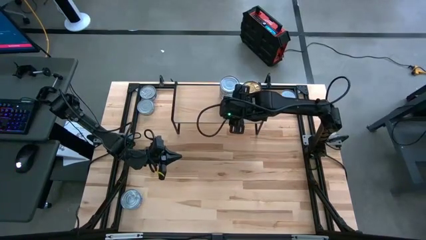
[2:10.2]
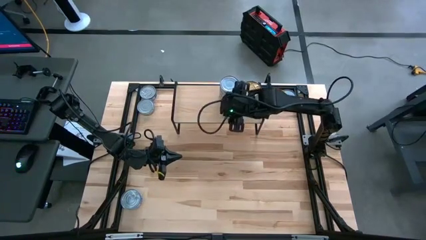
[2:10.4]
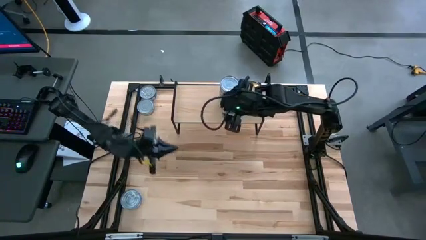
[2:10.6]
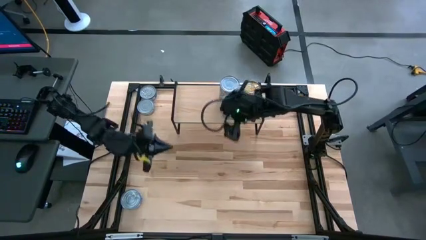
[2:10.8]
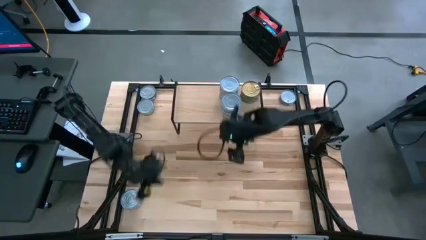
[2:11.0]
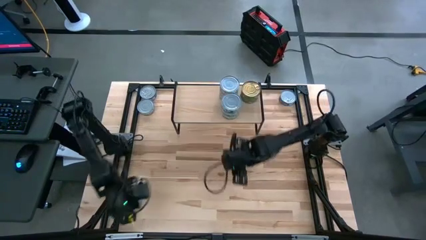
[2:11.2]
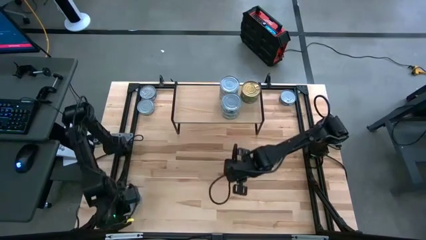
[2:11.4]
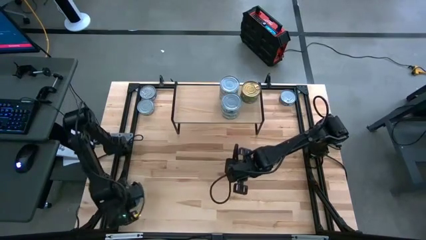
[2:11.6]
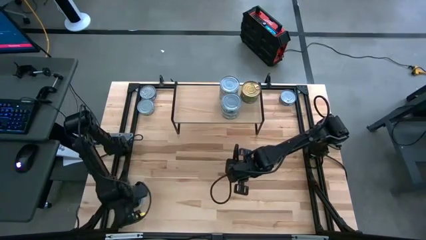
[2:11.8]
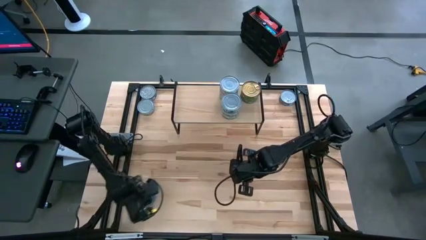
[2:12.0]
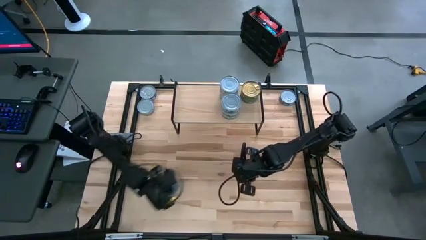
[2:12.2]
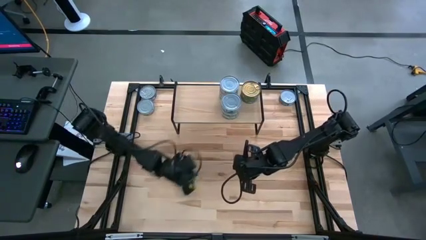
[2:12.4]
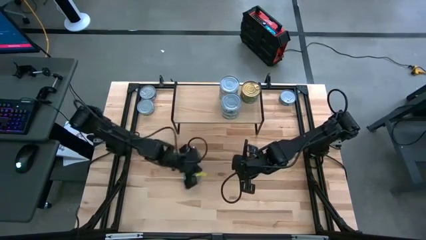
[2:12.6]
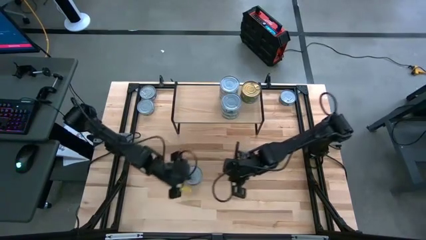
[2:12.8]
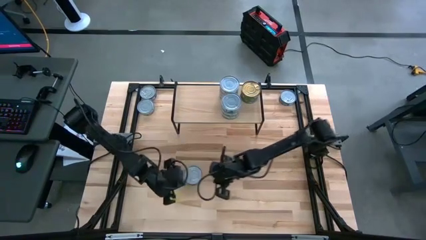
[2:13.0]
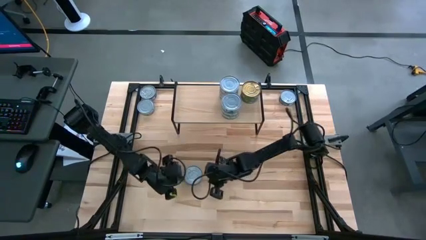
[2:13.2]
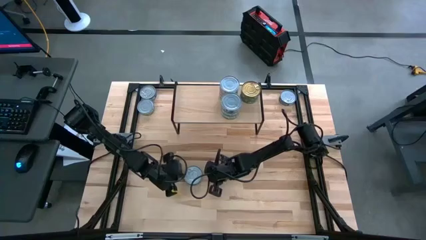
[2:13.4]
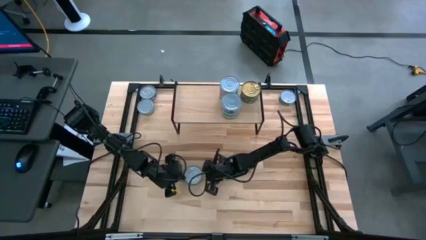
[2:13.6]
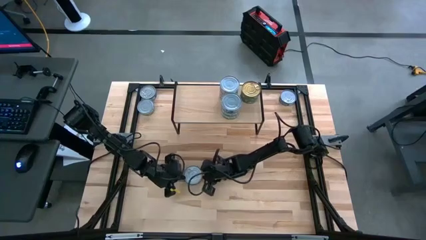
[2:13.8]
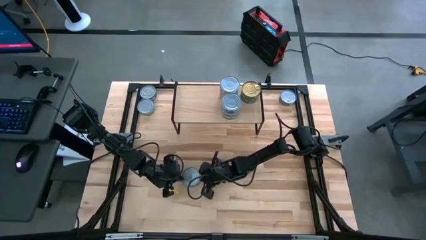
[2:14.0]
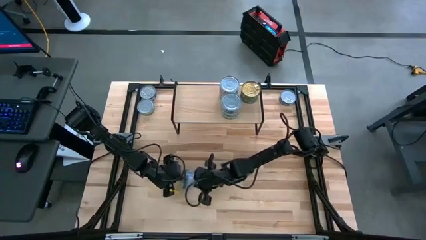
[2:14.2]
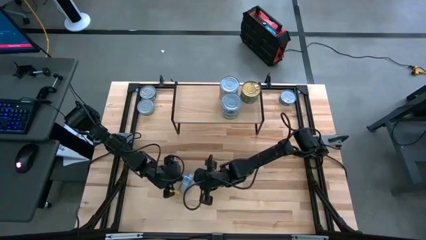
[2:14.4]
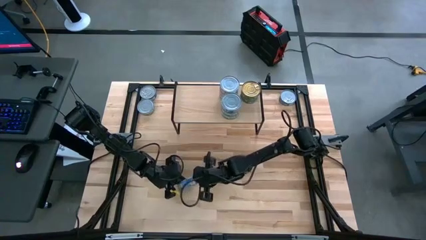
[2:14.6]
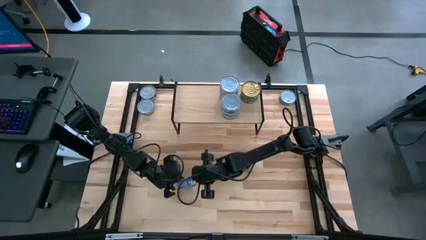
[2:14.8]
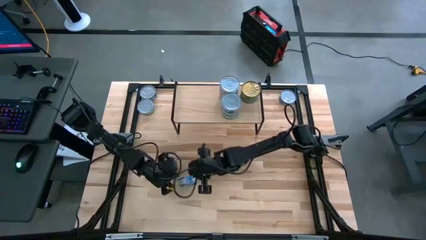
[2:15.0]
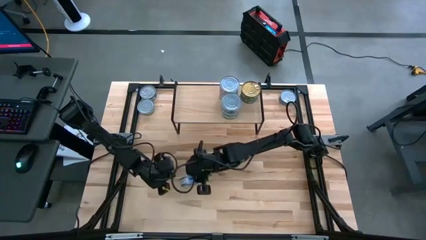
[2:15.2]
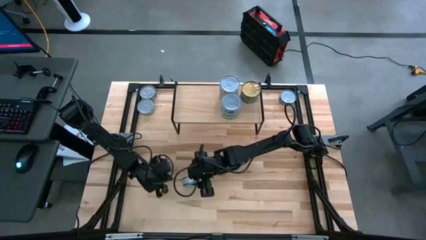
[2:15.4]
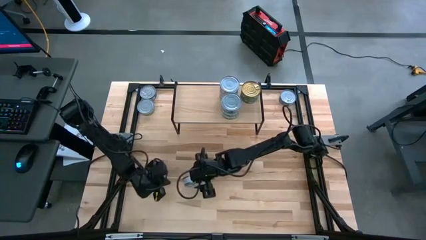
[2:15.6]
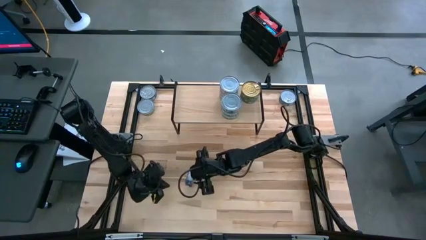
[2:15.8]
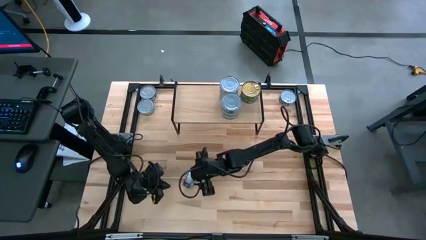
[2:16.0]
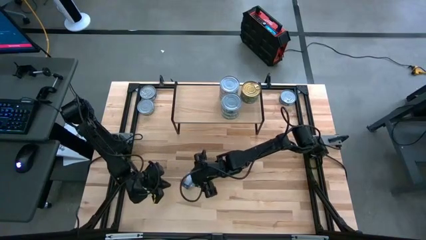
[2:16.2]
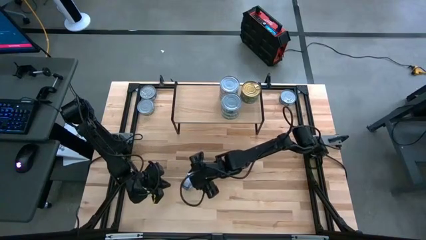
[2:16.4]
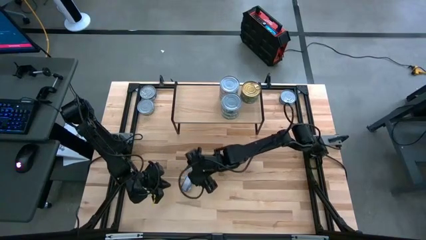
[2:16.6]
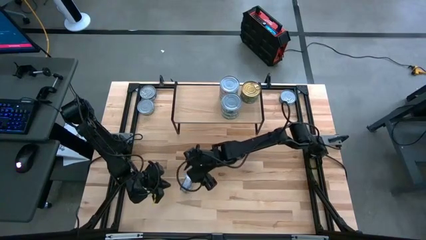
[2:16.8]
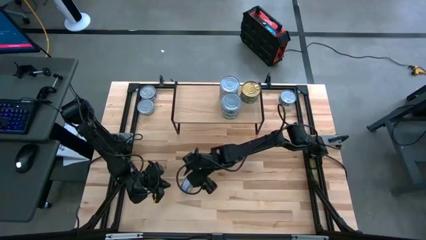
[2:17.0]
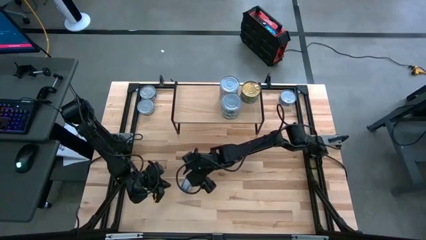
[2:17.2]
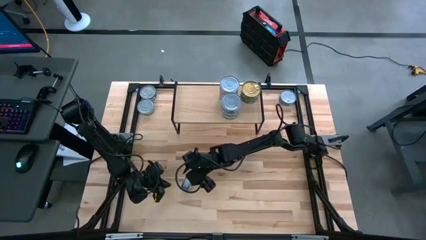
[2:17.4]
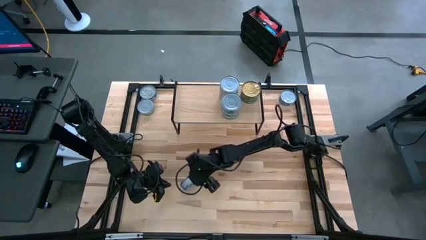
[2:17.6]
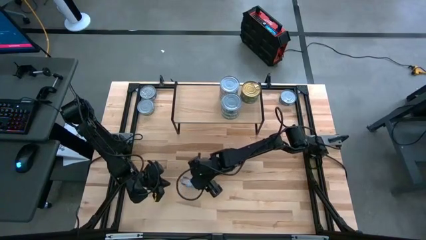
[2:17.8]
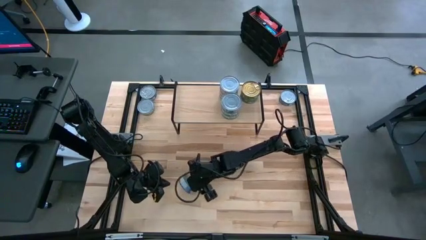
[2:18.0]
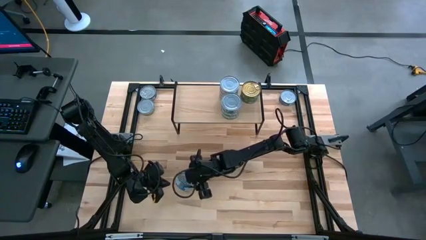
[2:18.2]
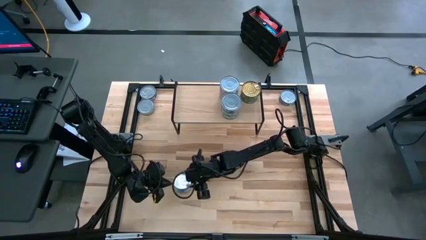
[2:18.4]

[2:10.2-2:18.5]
Task: Stack canned seafood by type on shelf
Put the blue tuna can on the shelf

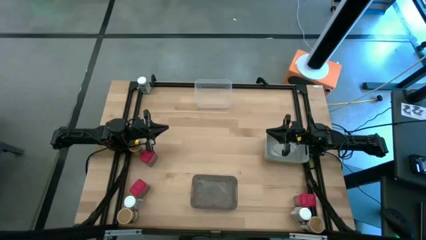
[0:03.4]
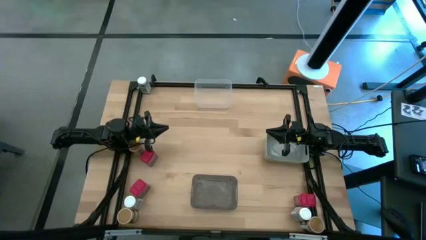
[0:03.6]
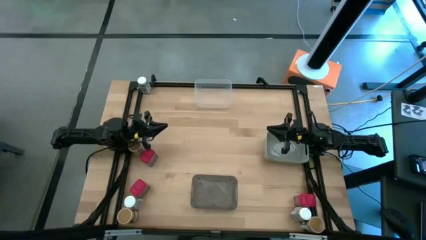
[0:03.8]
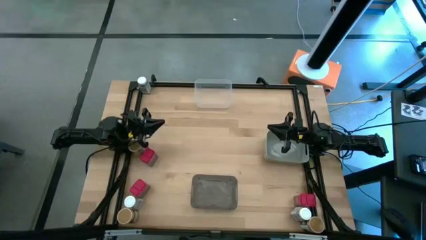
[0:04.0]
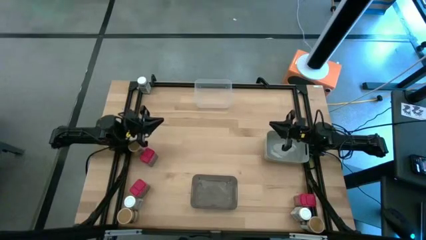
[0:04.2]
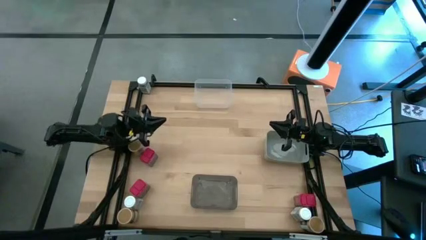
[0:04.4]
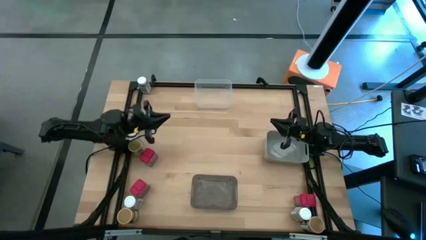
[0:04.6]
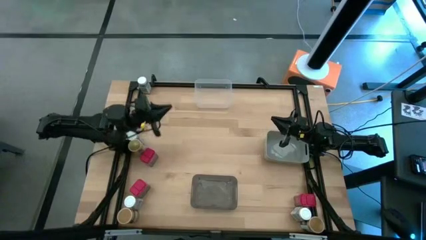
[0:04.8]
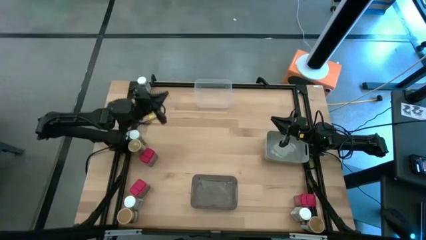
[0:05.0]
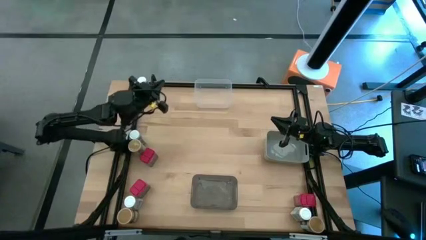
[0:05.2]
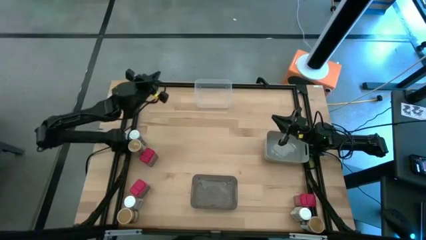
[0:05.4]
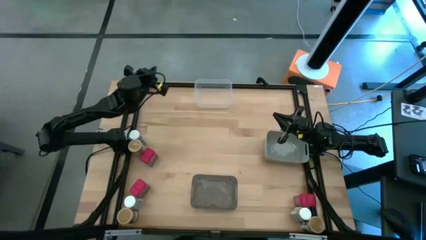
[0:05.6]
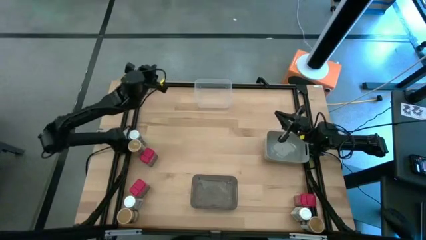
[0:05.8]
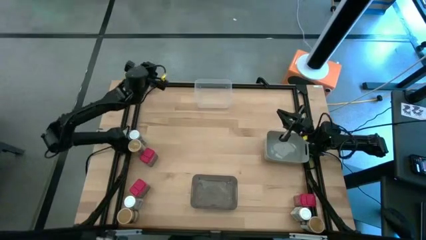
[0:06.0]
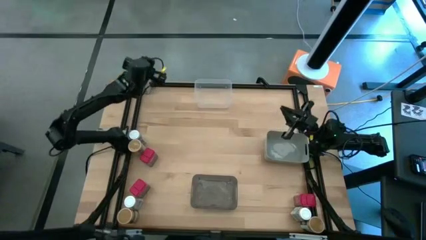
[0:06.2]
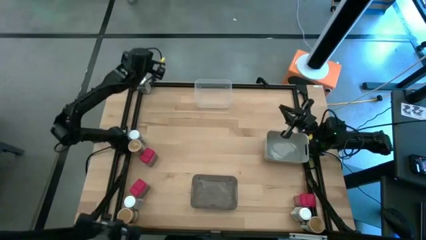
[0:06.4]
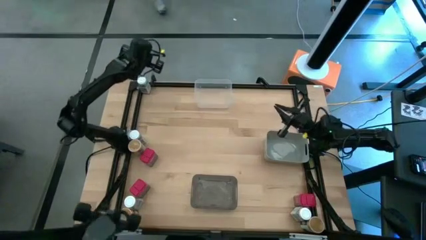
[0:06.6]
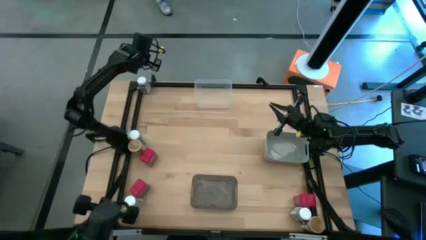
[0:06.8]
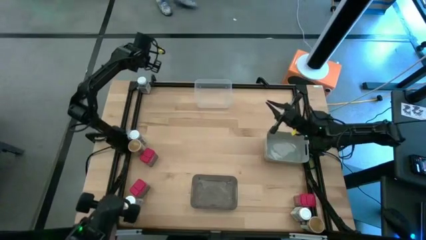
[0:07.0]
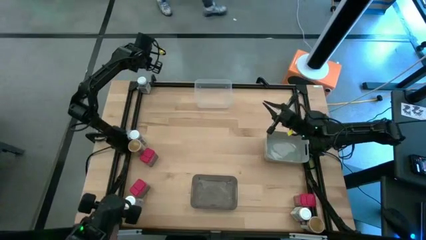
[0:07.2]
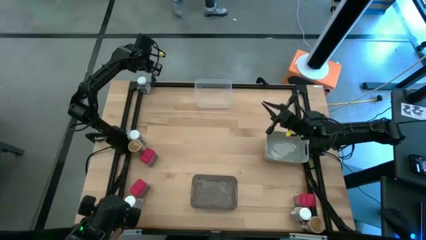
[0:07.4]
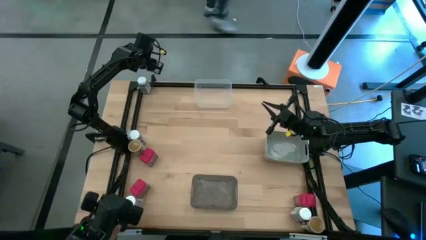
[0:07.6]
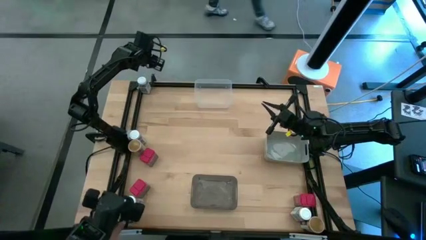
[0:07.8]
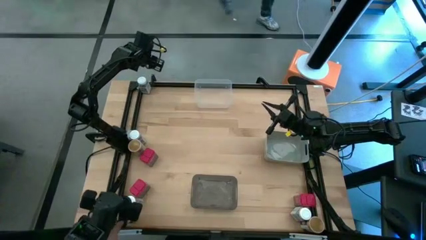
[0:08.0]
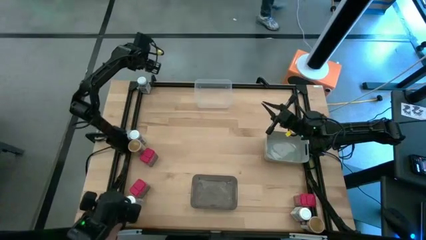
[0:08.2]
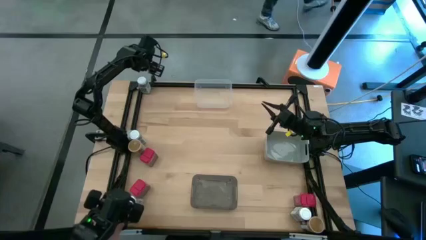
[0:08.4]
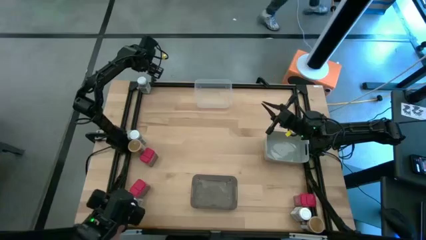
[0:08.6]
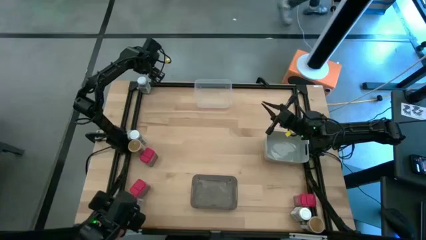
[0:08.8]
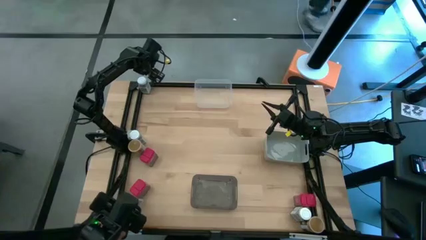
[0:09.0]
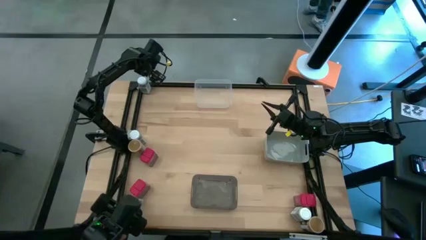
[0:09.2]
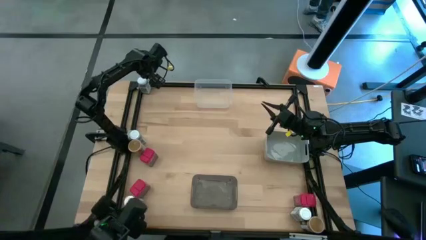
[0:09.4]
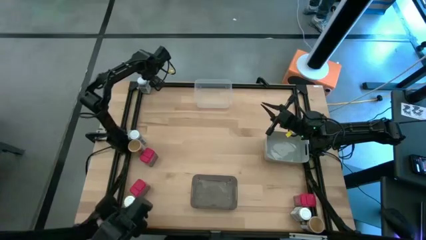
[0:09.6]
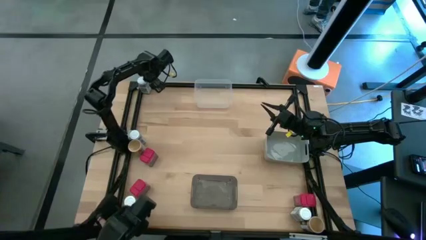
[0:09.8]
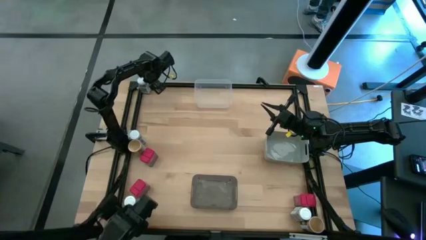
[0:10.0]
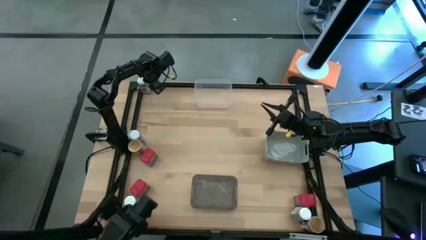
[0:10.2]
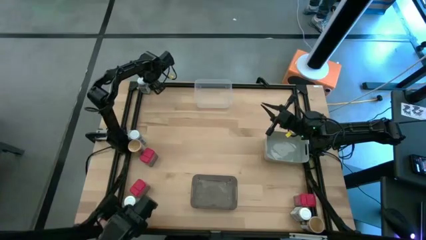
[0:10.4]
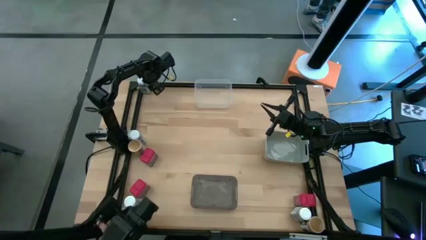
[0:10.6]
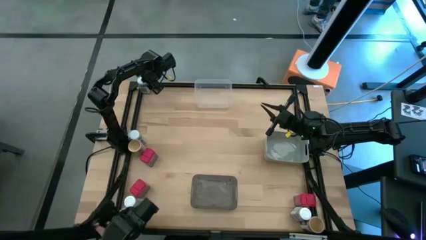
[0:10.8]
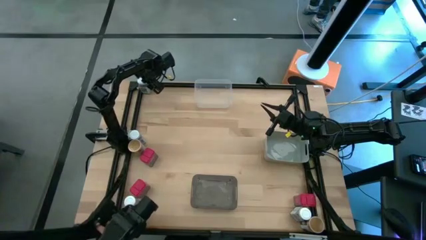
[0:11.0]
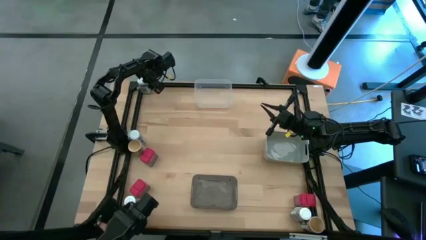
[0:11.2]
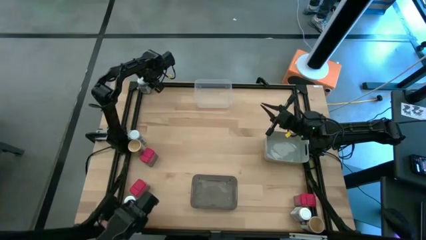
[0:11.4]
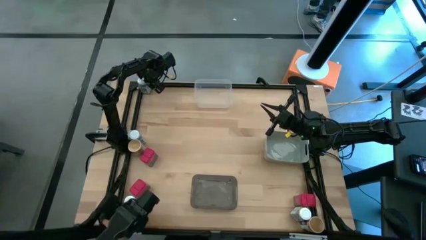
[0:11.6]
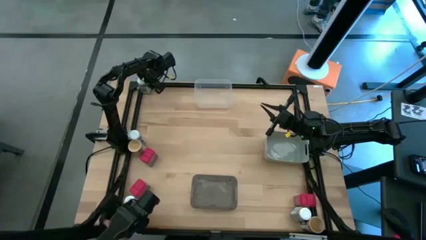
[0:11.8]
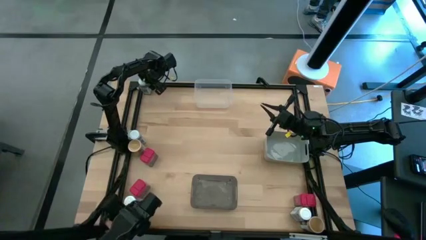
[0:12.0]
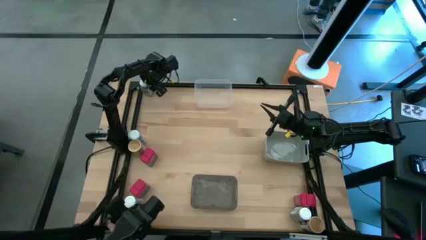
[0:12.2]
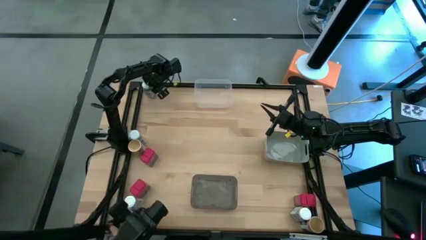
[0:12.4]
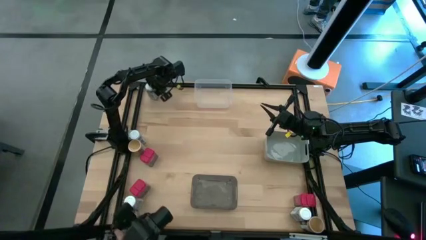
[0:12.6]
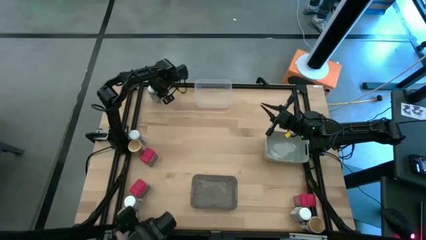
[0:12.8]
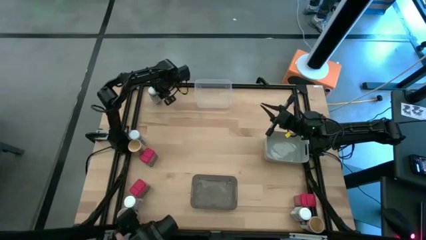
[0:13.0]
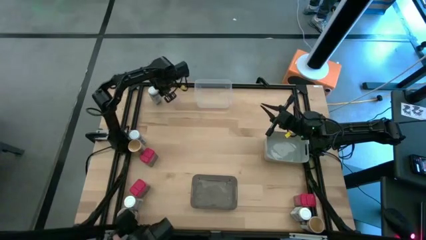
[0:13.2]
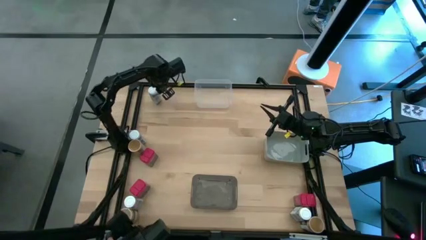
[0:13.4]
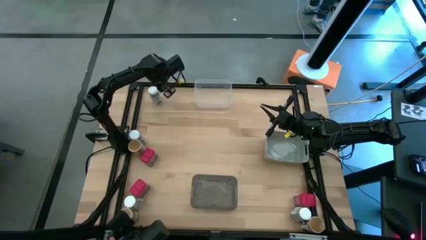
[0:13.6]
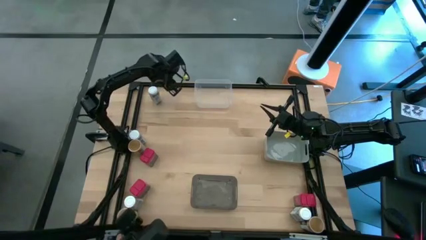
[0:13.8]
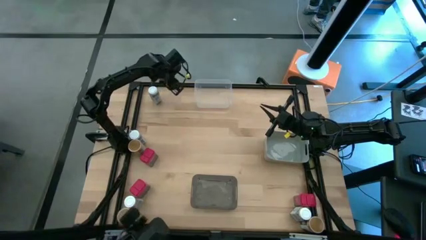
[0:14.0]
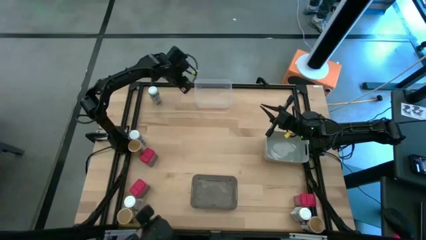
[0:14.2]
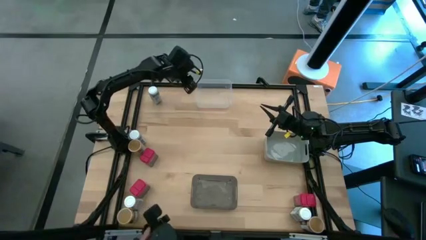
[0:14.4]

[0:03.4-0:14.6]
Task: Sort spices by type
Put the white seasoning bottle into the transparent bin
